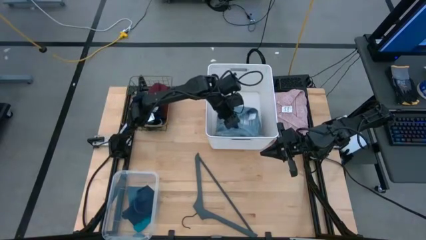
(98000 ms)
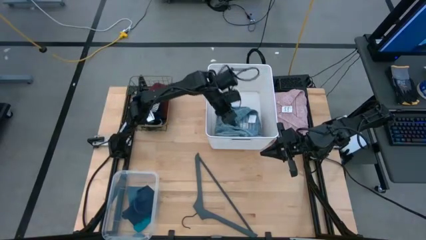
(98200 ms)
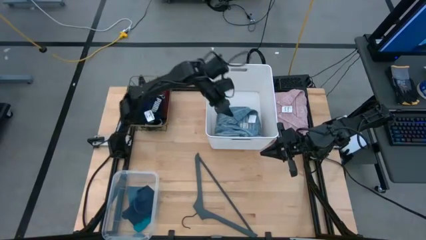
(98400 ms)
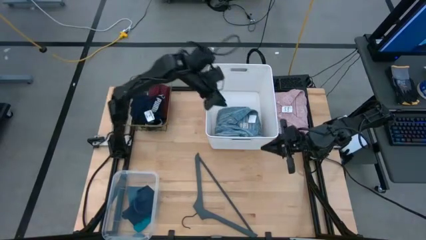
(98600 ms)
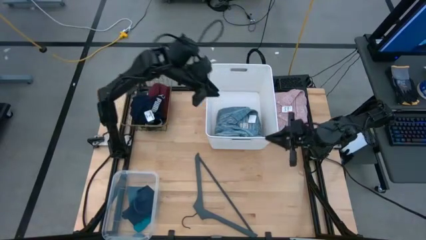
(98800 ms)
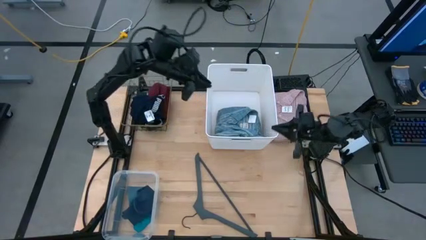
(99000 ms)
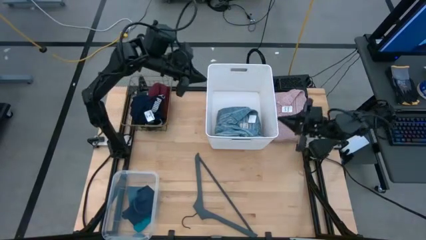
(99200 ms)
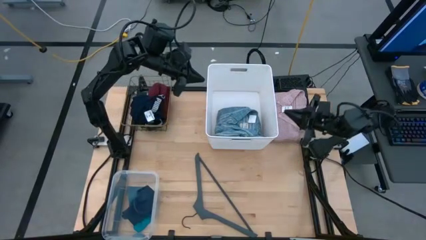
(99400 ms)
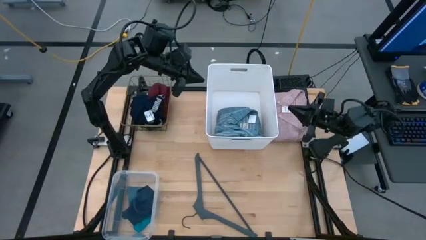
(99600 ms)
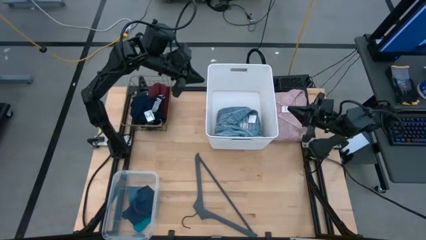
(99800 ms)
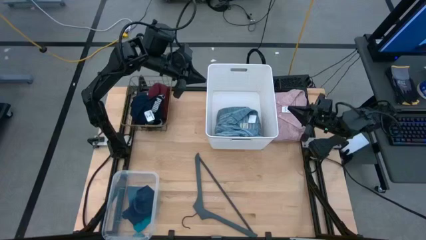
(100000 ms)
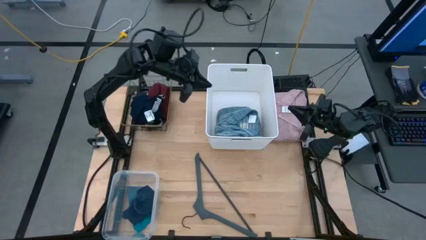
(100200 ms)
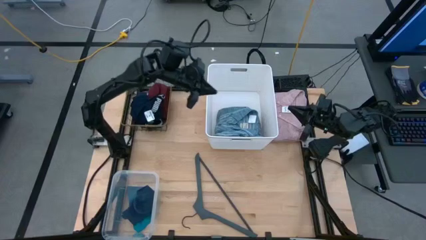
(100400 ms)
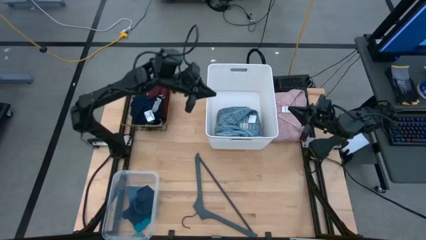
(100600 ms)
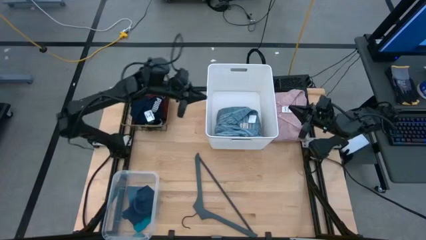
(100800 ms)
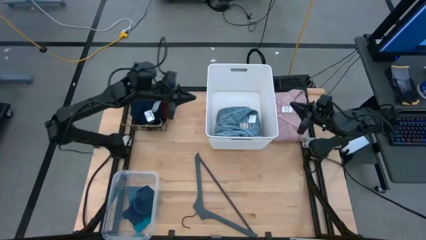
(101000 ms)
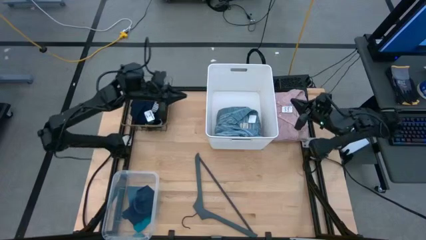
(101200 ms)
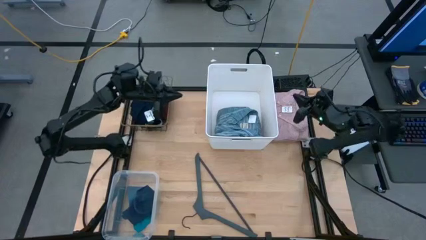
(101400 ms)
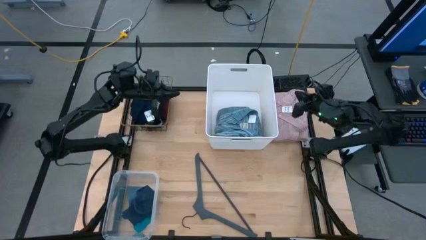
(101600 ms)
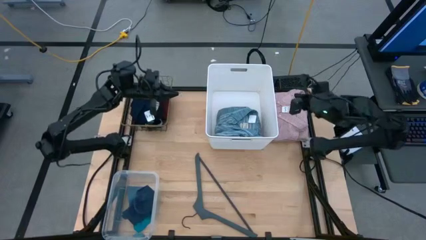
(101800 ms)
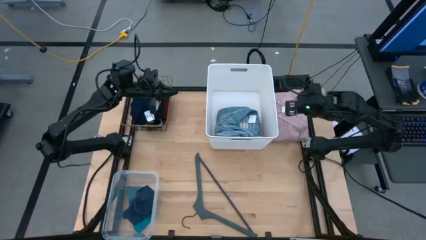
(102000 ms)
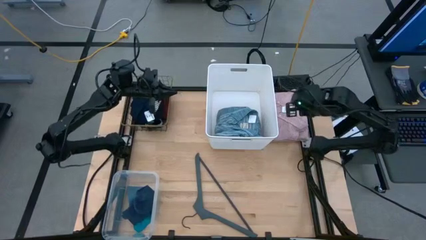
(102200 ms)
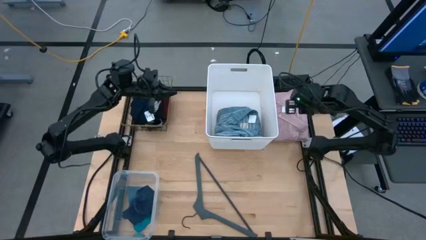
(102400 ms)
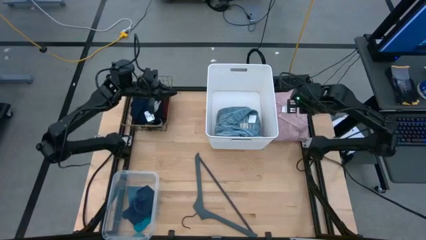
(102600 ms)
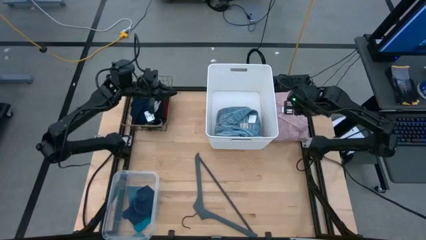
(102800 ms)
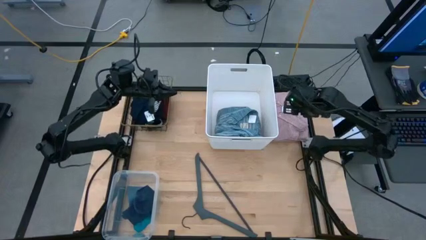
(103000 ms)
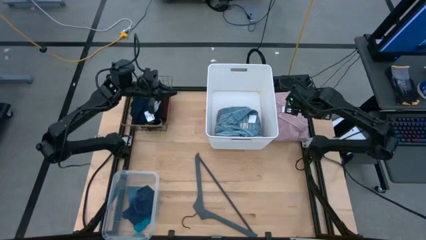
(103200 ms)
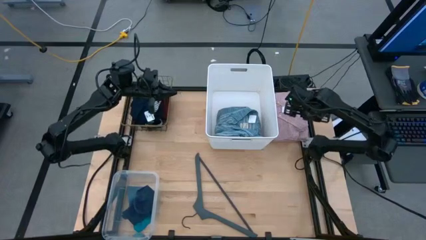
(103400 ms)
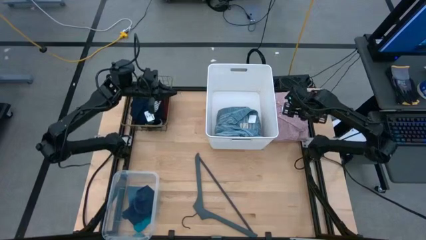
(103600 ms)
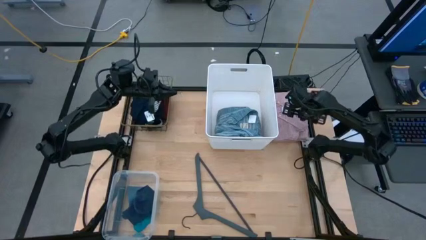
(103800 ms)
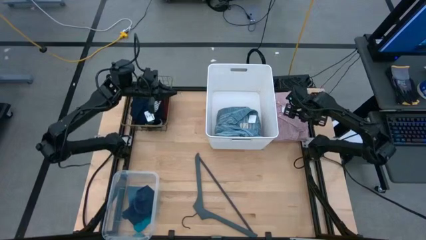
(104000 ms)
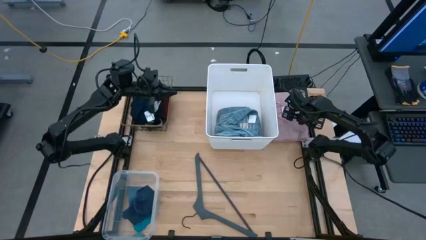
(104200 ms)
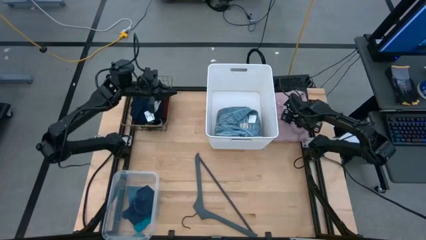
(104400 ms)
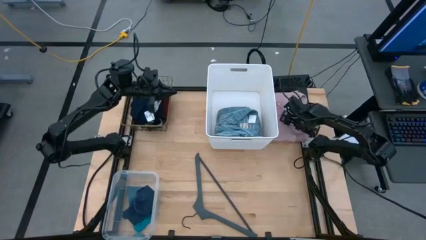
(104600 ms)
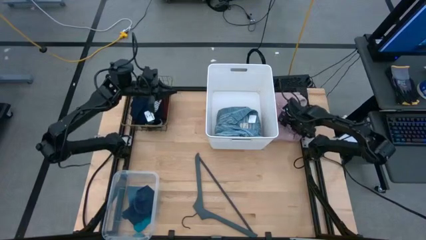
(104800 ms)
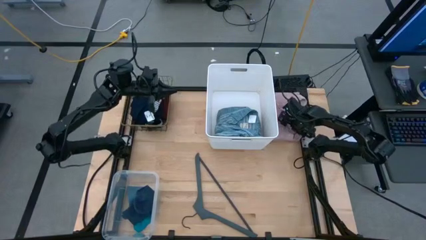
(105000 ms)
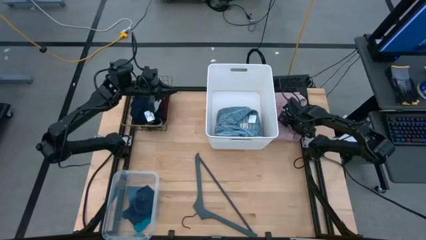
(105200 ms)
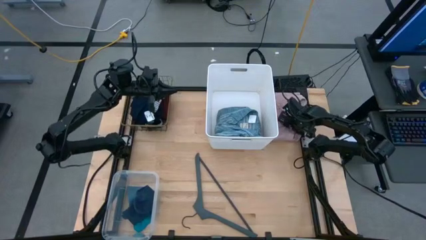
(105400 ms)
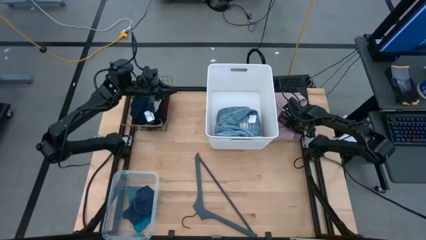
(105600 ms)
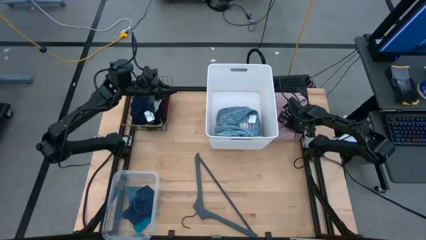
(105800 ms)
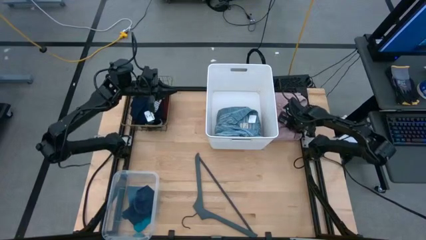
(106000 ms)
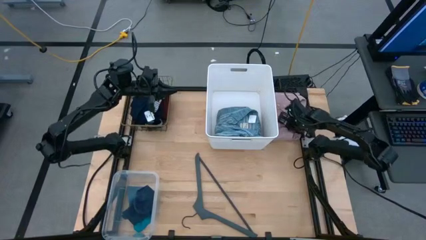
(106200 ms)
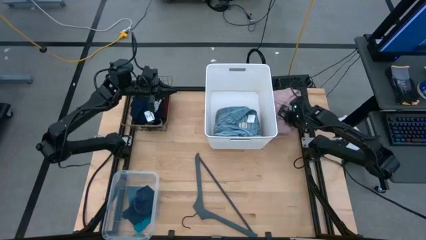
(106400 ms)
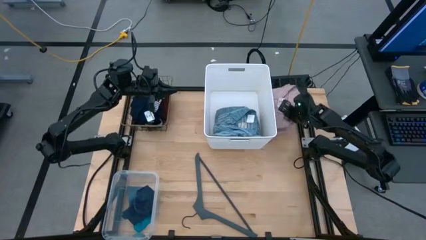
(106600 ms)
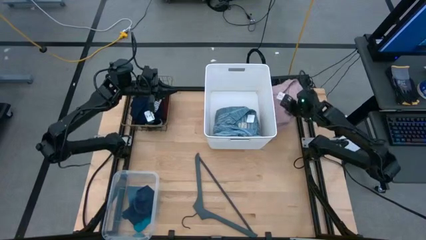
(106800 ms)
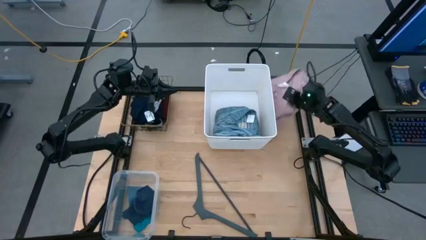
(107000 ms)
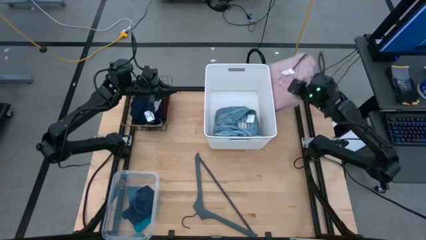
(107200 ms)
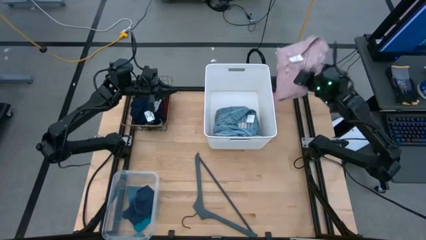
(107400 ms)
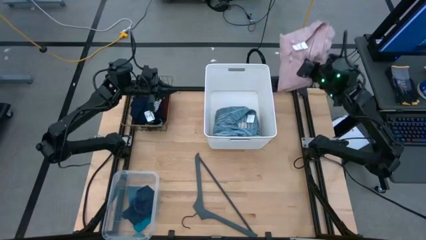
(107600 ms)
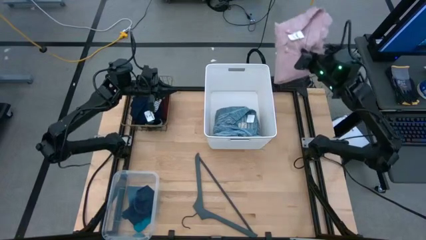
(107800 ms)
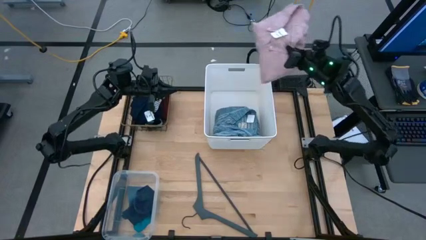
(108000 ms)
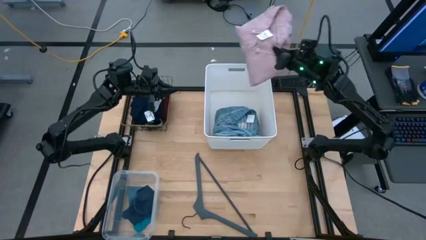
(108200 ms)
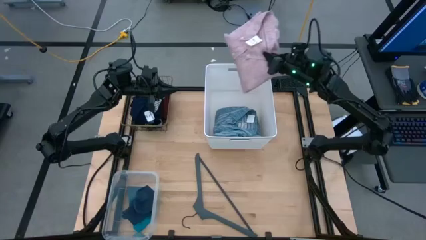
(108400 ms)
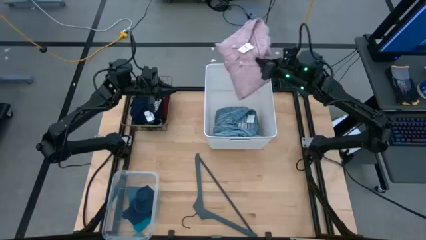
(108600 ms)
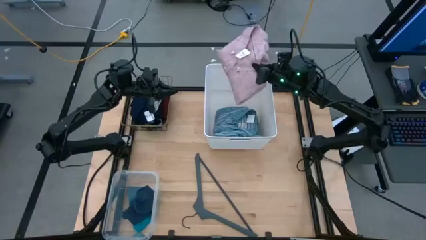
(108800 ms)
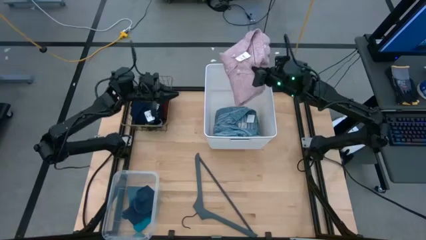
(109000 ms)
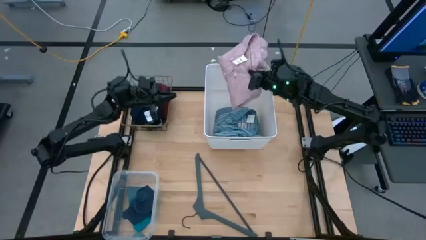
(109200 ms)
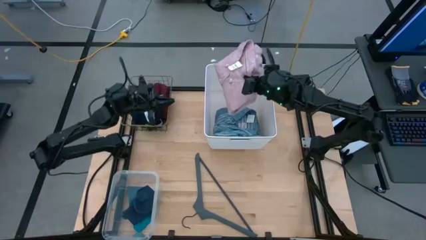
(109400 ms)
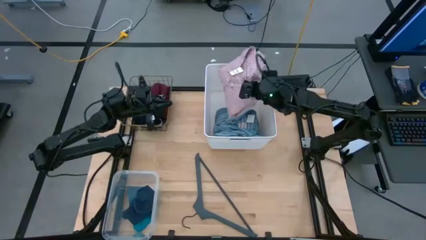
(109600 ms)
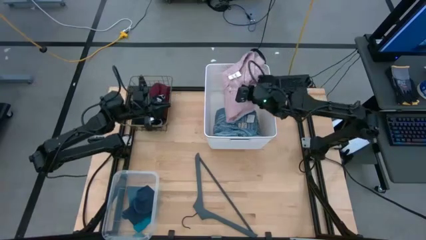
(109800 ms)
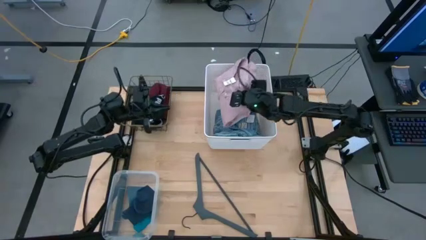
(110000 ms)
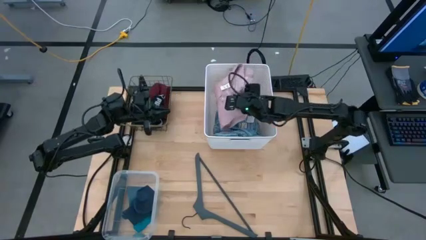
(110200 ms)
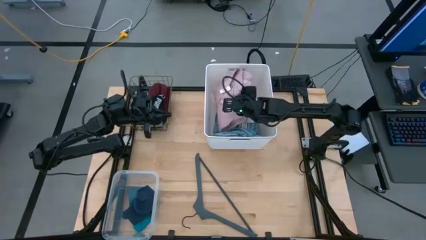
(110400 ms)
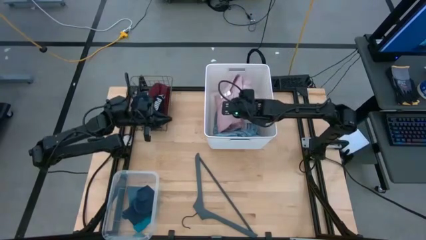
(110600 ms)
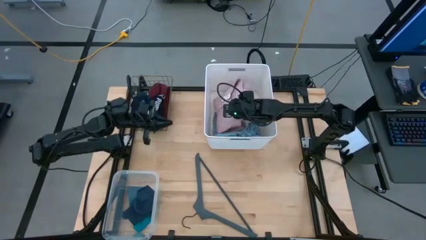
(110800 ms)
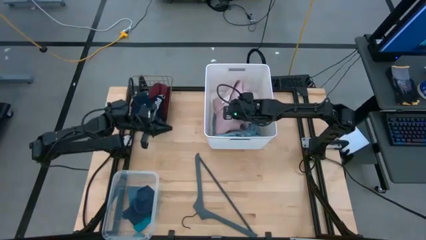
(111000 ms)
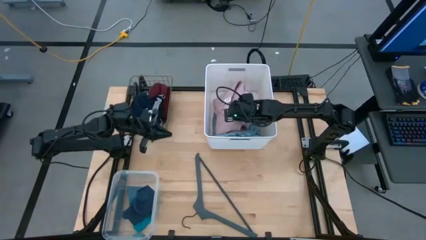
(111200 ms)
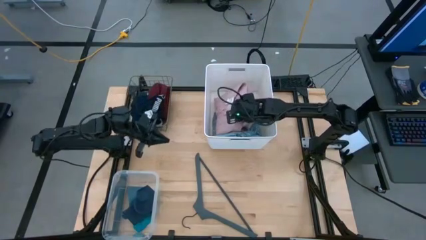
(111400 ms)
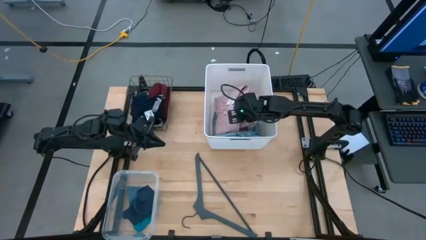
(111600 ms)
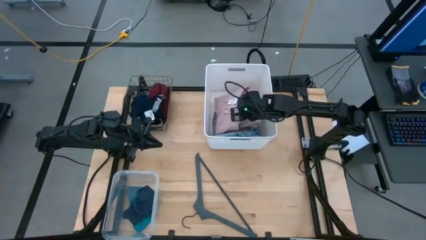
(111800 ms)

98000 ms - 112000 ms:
Task: Pick & Place Cloths
Put the pink polo shirt into the white laundry bin

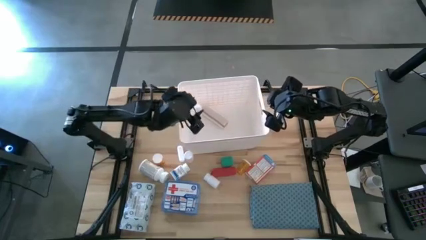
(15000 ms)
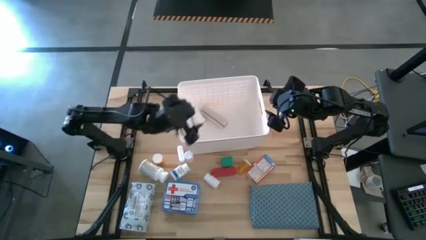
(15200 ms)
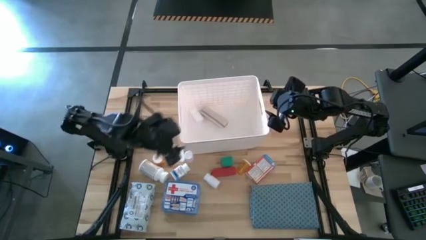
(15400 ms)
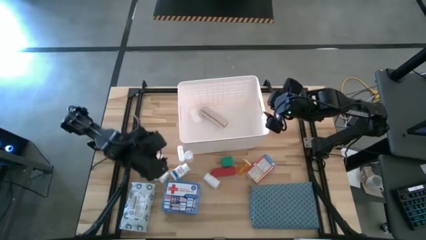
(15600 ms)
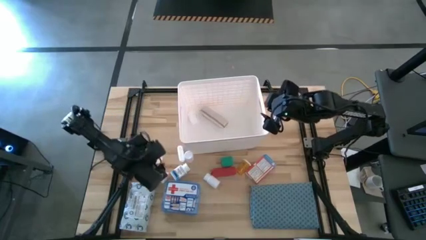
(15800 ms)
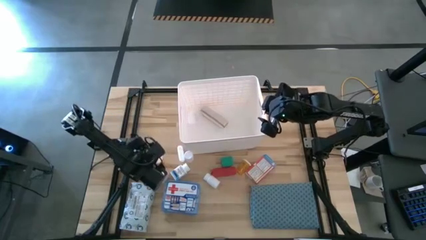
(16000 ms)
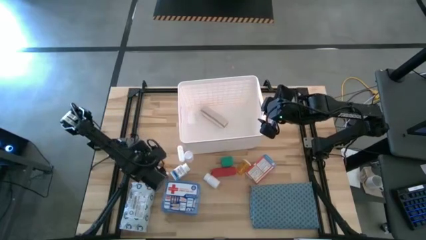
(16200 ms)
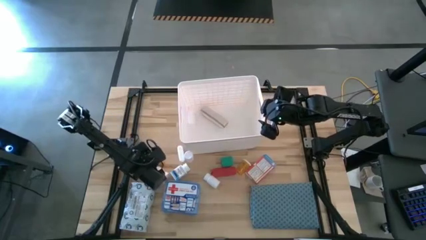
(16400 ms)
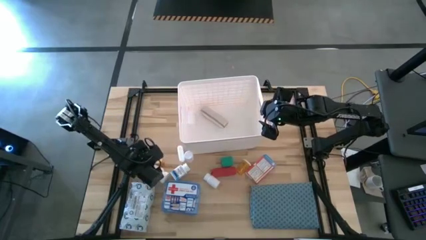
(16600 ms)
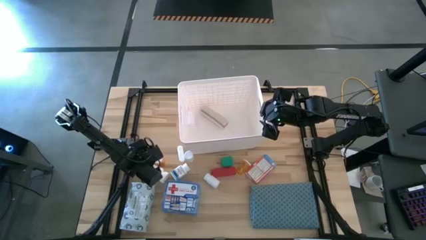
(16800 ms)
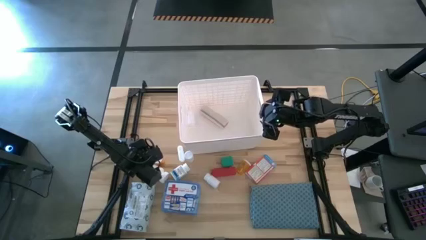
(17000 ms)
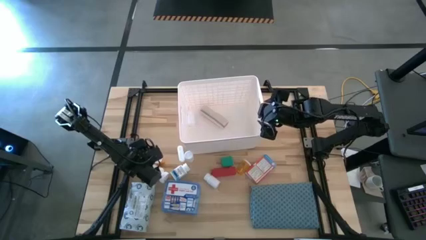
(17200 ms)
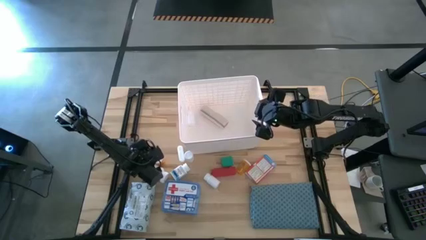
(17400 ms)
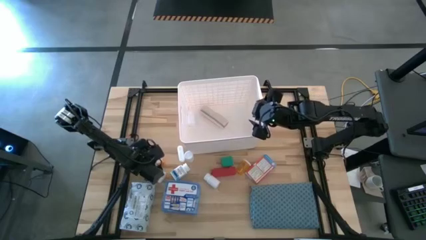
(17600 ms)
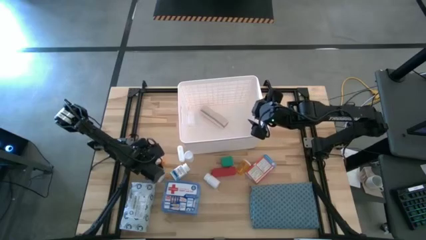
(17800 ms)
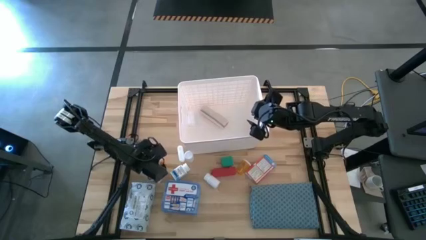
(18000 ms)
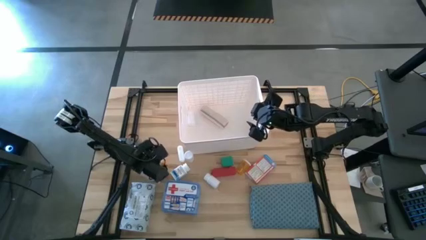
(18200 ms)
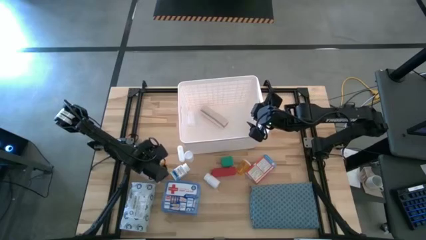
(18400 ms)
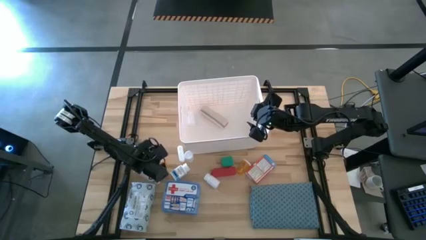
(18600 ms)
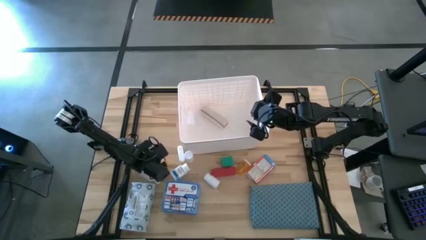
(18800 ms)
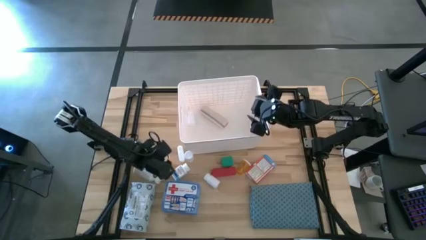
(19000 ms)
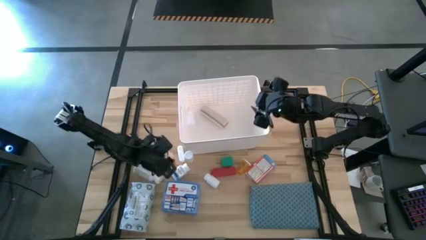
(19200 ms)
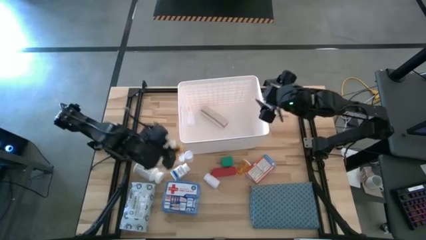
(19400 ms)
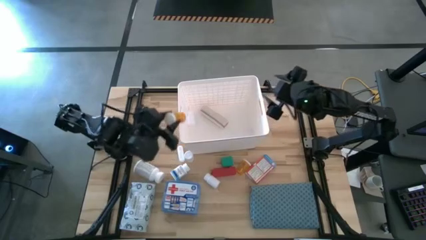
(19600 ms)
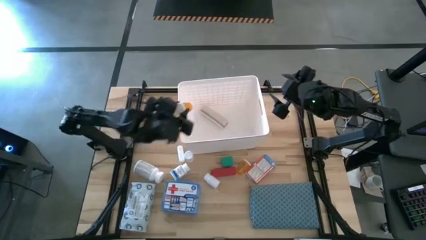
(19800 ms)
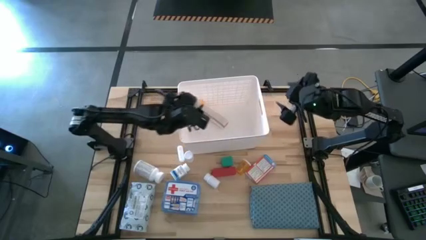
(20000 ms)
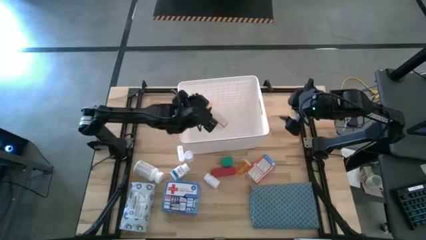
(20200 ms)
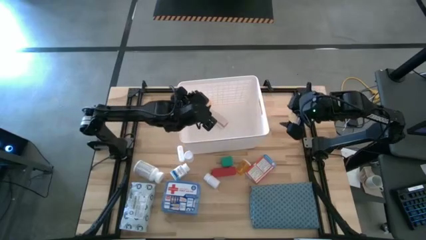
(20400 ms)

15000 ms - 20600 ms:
Task: Pick & place medical supplies in basket/bin
Put the left orange pill bottle into the white bin
